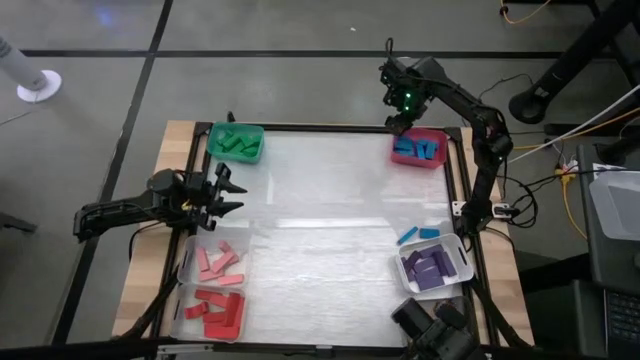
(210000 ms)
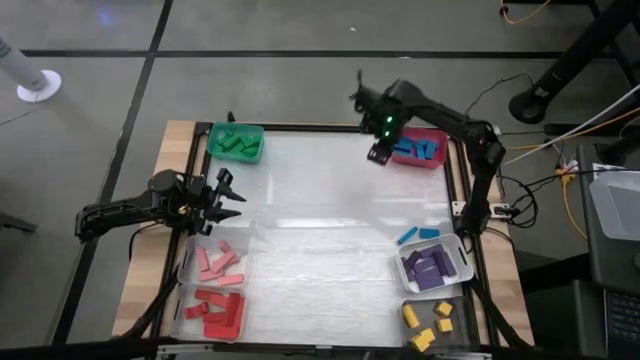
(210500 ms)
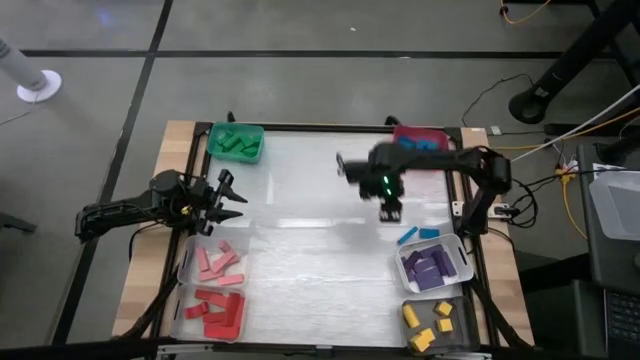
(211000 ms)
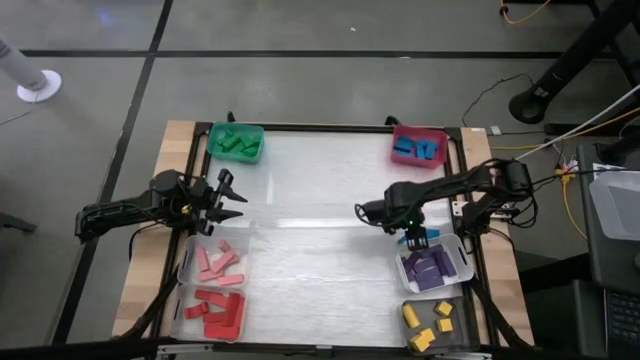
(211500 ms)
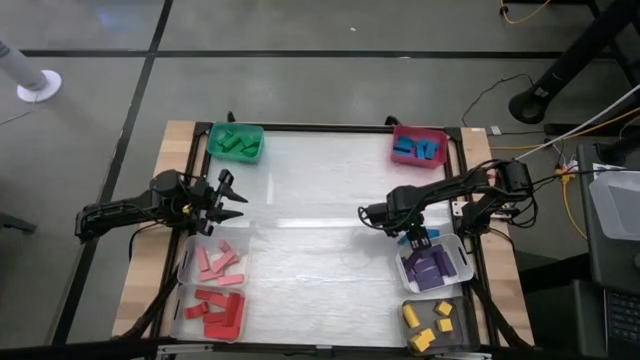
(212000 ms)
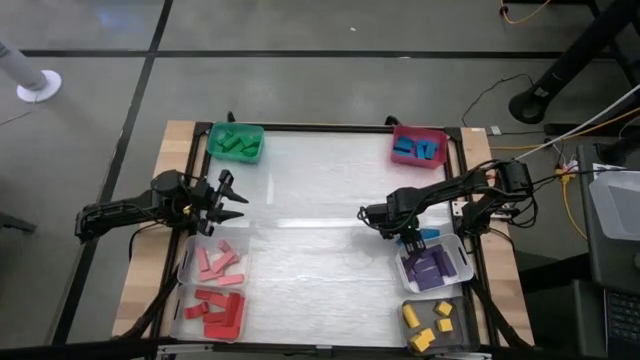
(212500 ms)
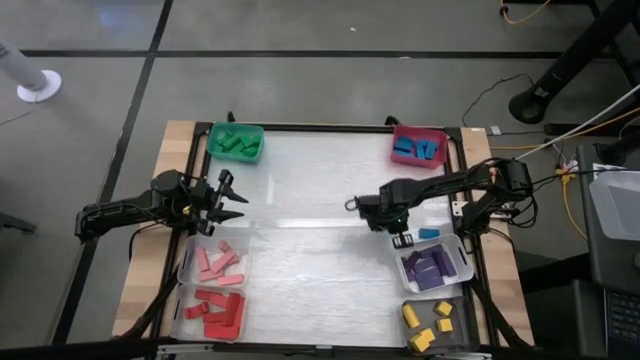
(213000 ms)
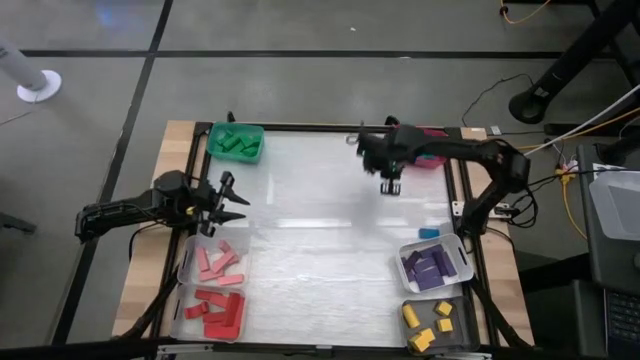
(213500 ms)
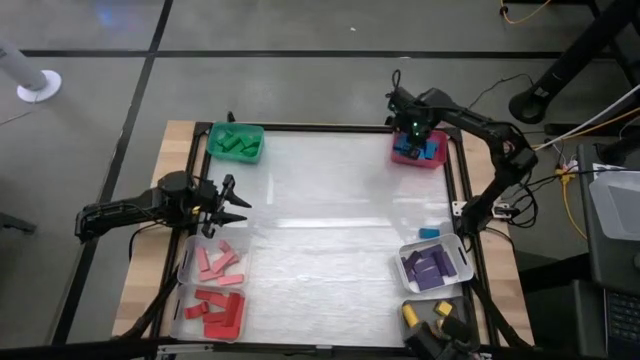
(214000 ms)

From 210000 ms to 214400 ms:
Task: Sort blocks
Put the blue block into the pink bin

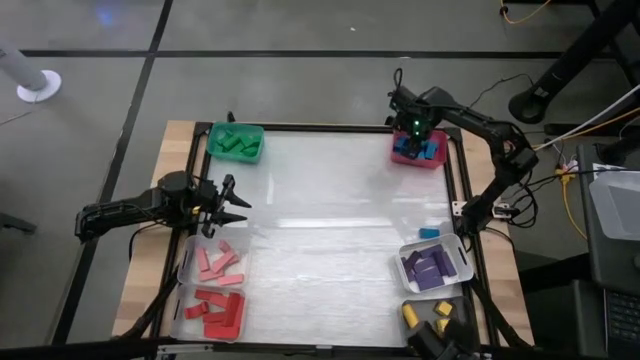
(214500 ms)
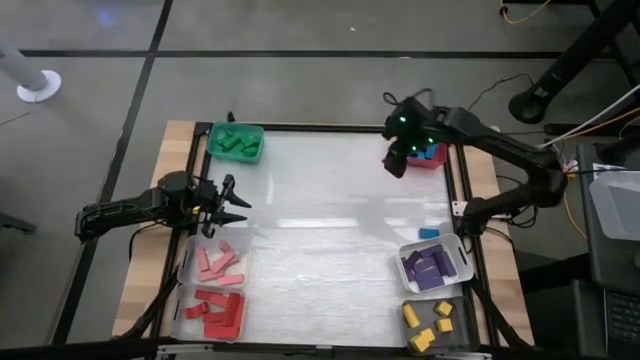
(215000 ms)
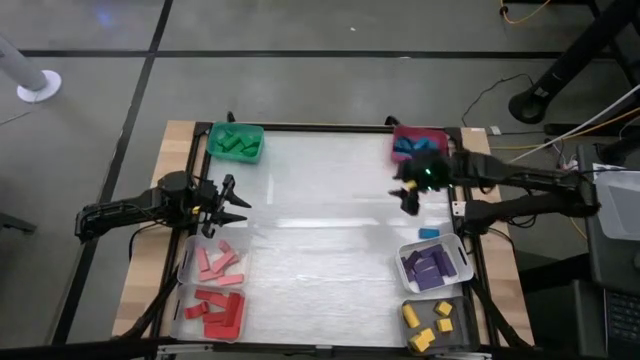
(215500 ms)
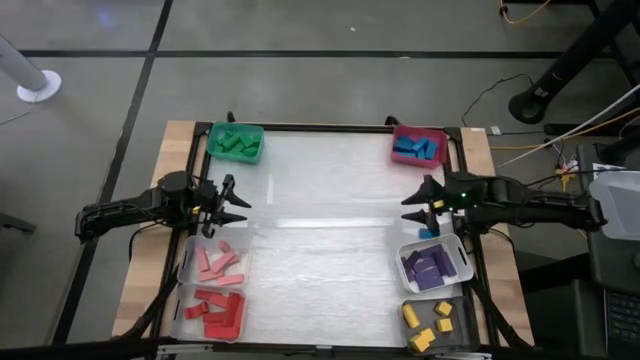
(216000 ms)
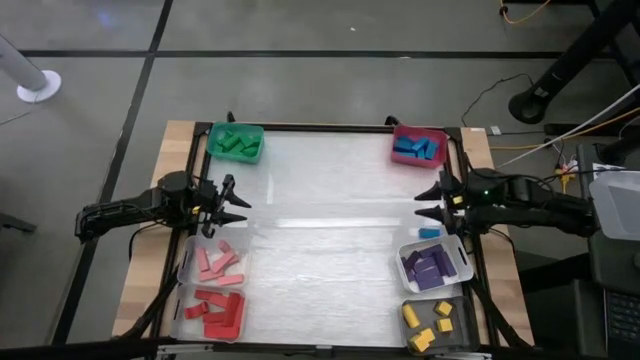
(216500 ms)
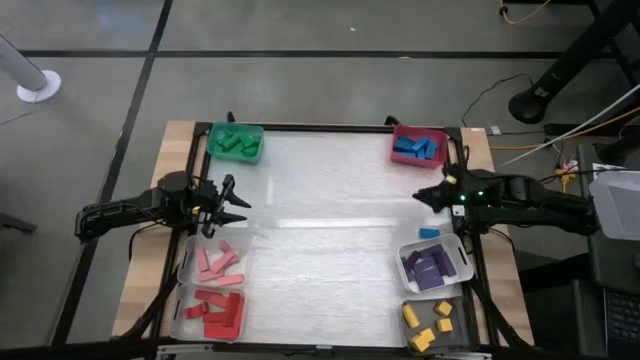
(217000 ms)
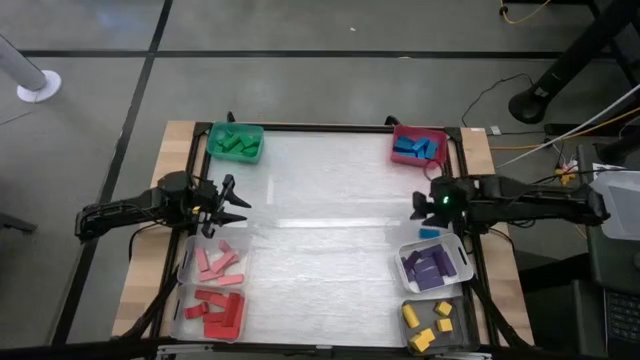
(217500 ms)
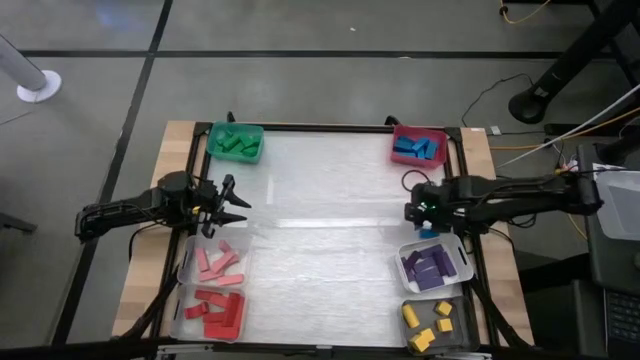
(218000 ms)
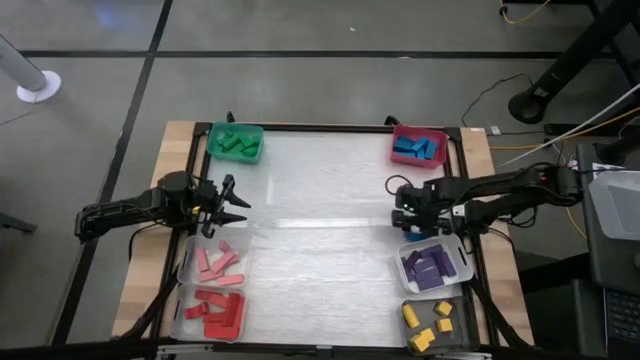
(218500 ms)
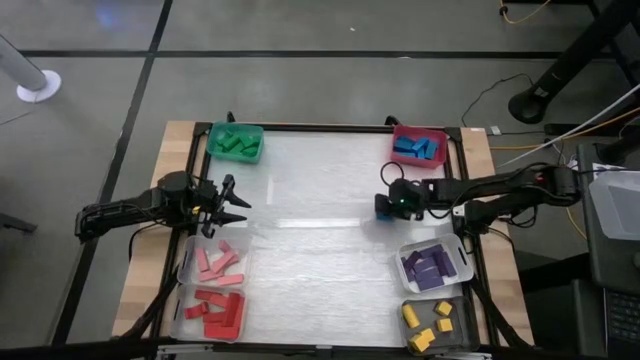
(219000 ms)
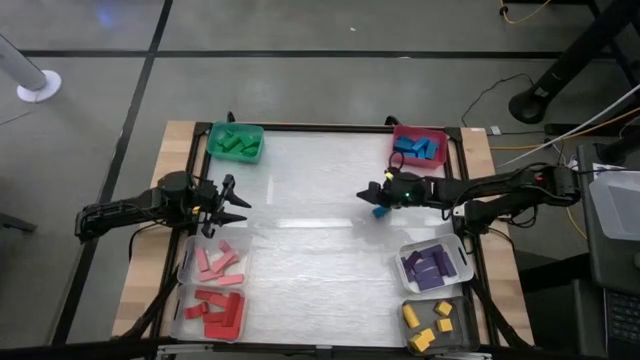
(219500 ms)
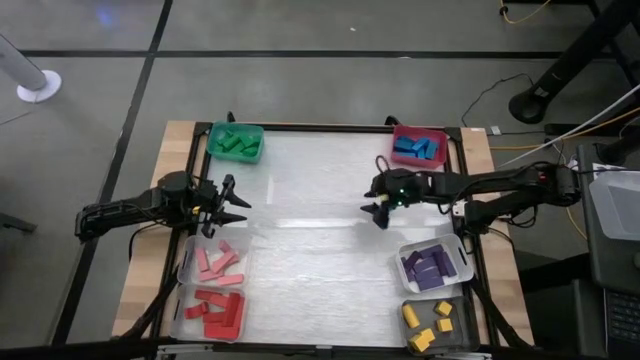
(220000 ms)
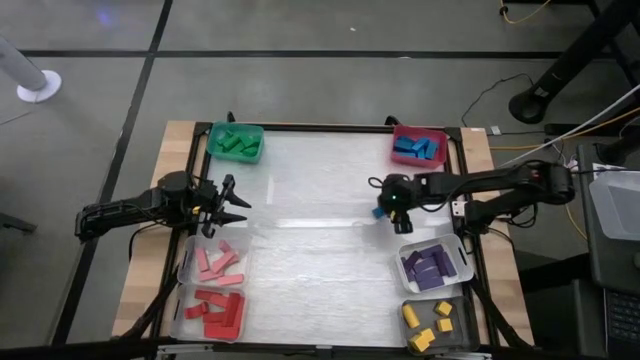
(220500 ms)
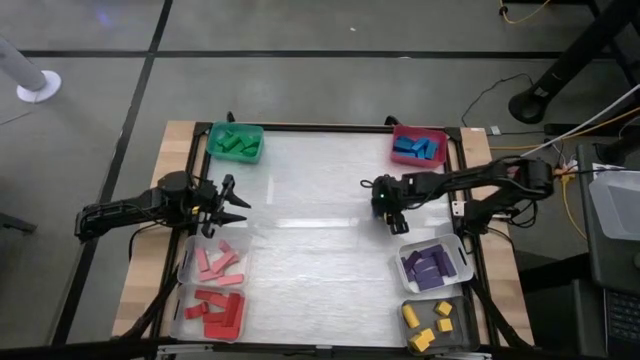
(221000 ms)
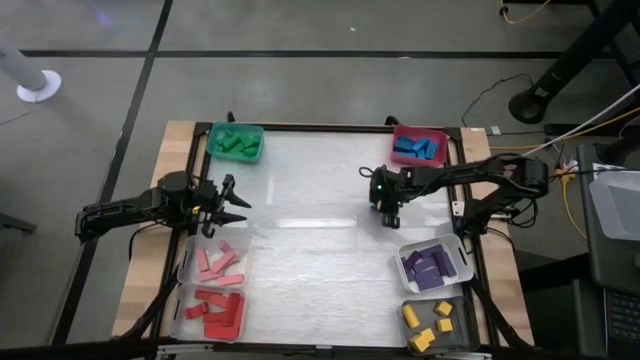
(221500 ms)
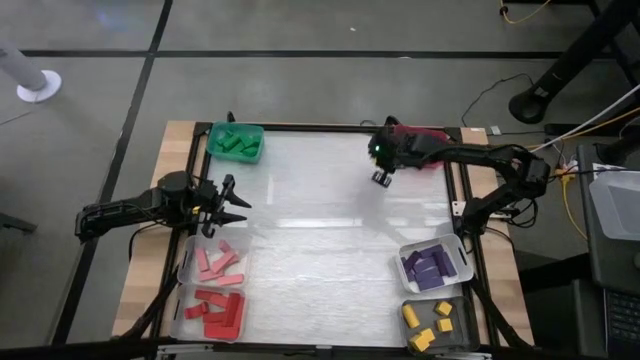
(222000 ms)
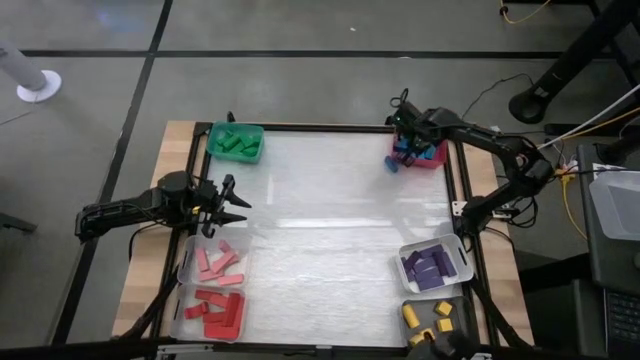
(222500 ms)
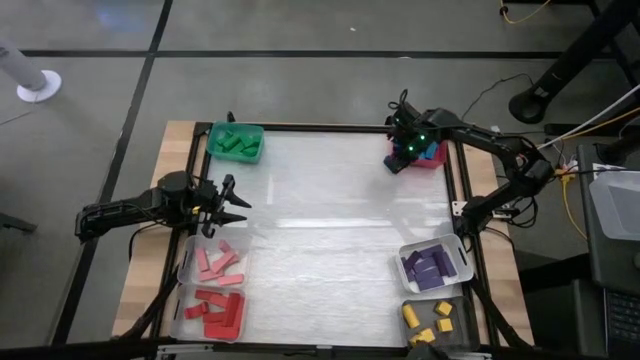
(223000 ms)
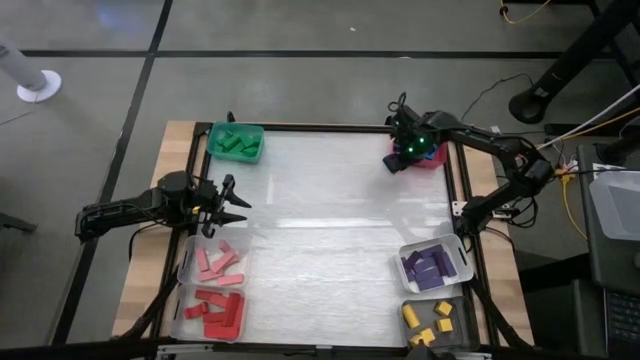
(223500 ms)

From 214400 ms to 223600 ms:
Put the blue block into the pink bin

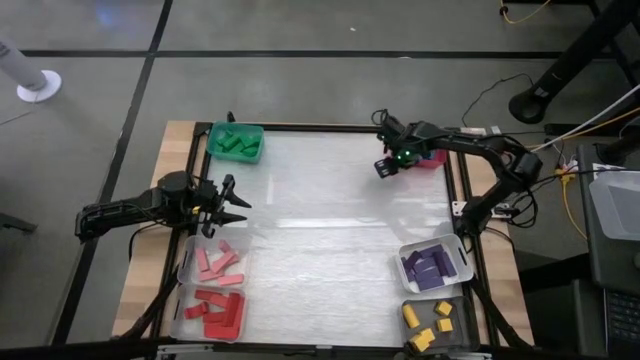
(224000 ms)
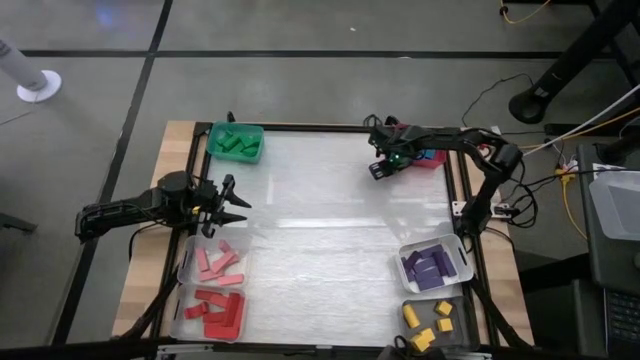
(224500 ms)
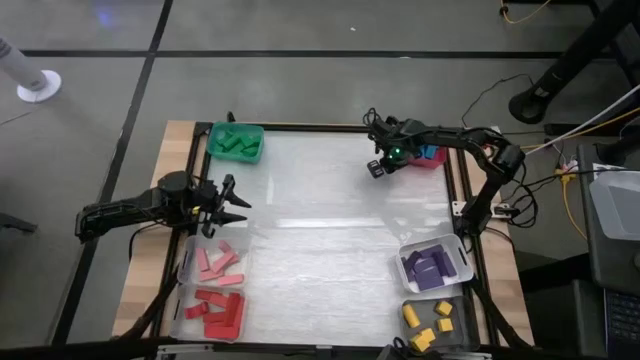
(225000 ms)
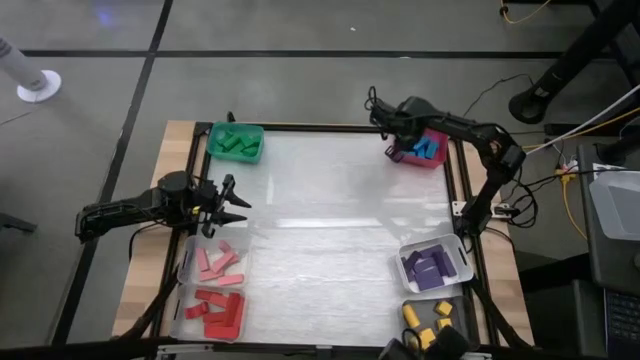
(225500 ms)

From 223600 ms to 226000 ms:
Put the blue block into the pink bin

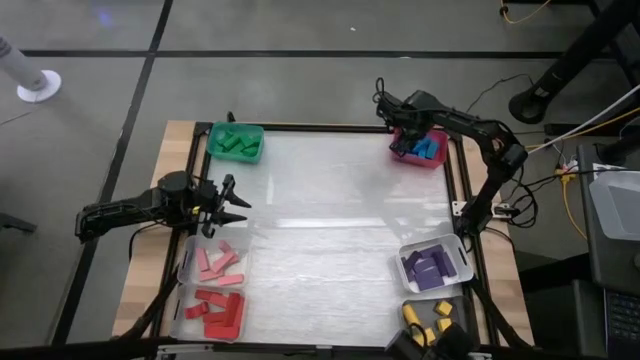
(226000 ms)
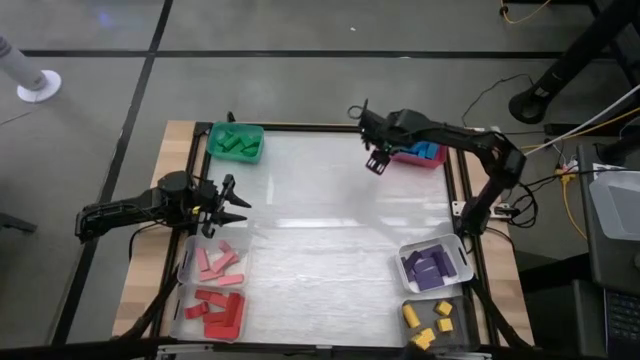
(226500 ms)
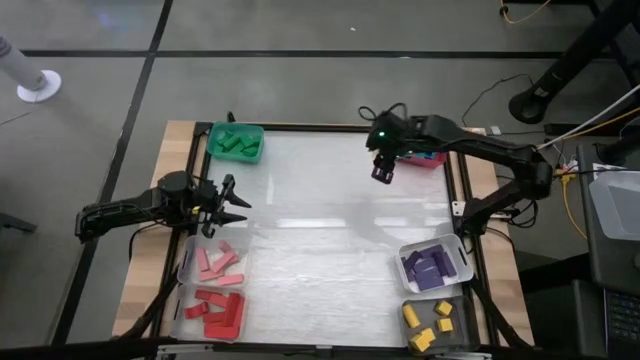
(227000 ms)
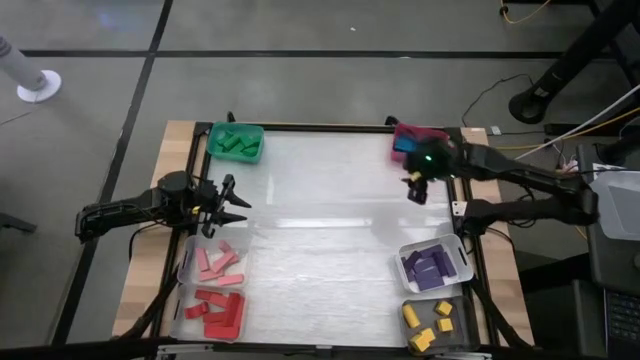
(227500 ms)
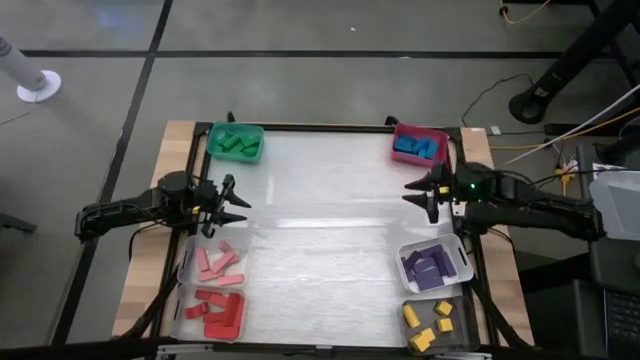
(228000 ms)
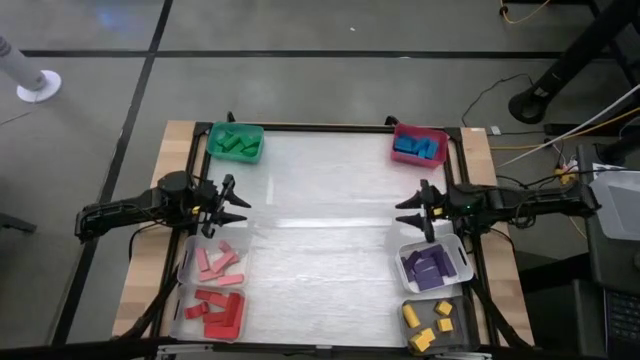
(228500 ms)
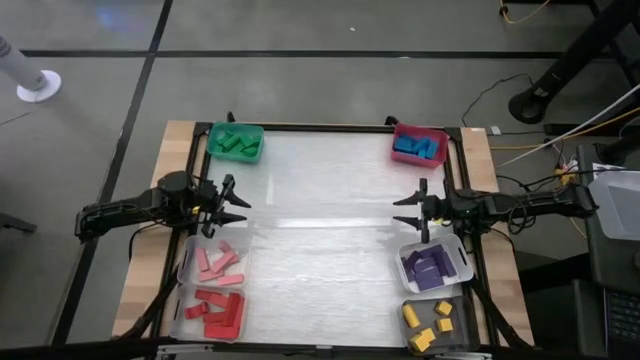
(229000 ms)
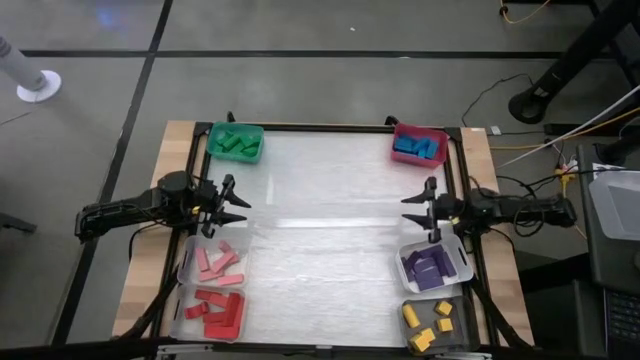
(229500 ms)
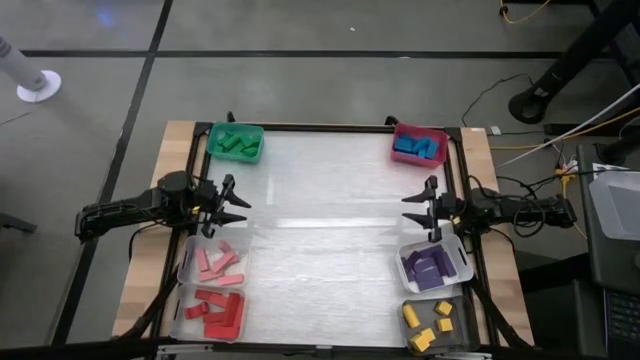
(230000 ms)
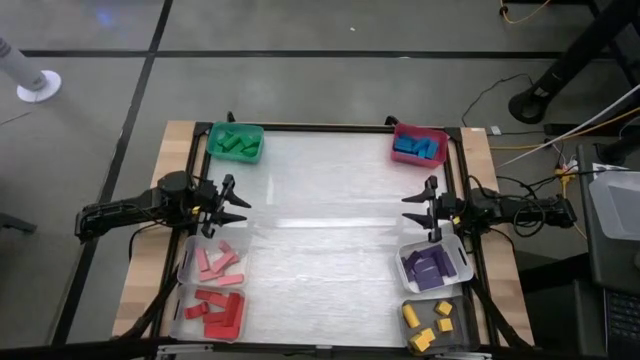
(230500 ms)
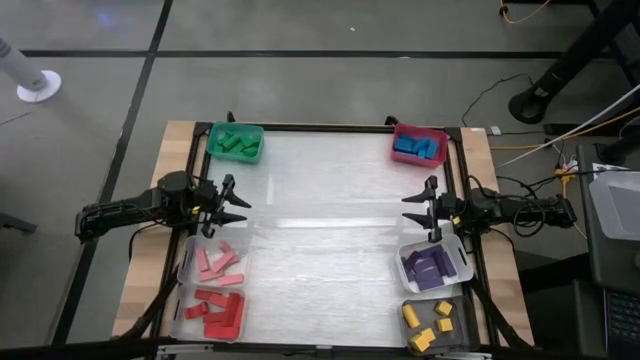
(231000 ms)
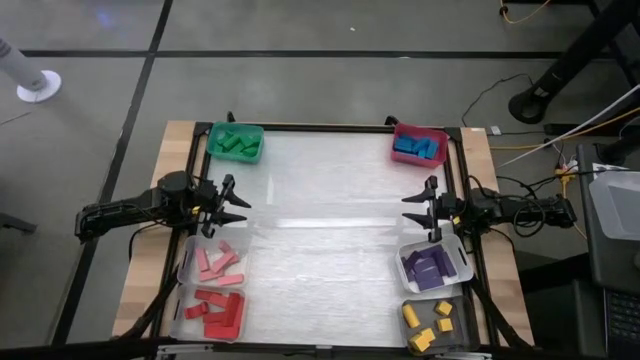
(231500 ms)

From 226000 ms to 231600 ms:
Return to Home Position
